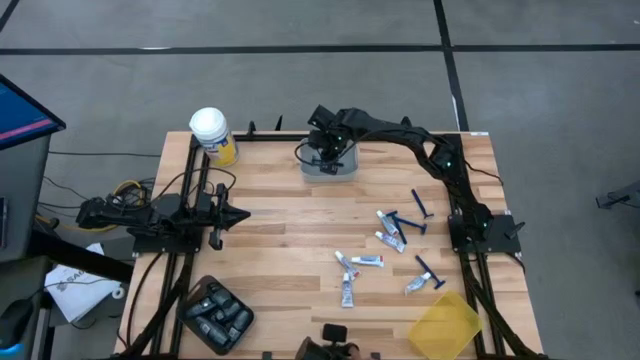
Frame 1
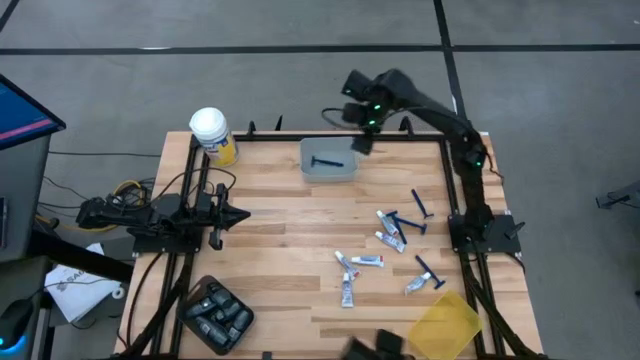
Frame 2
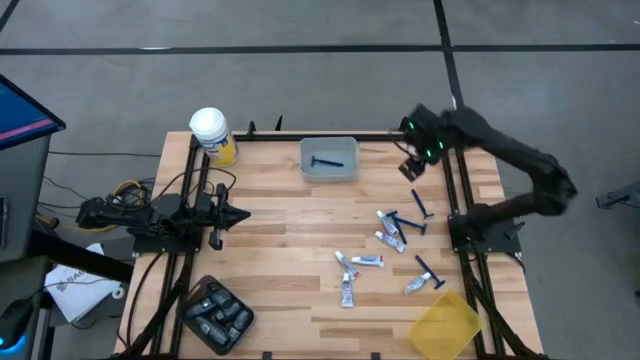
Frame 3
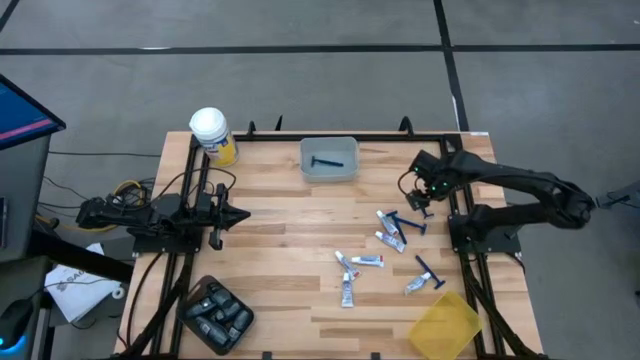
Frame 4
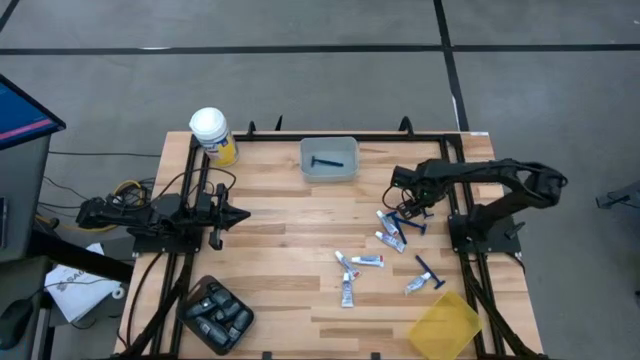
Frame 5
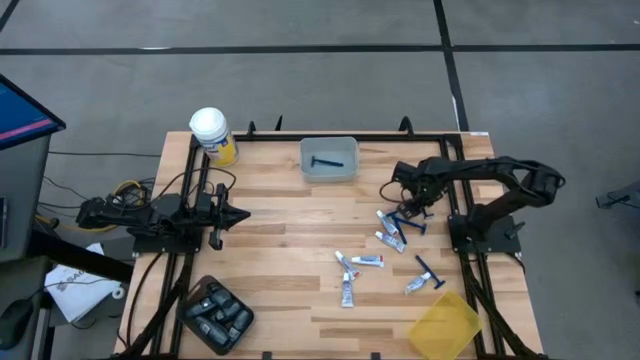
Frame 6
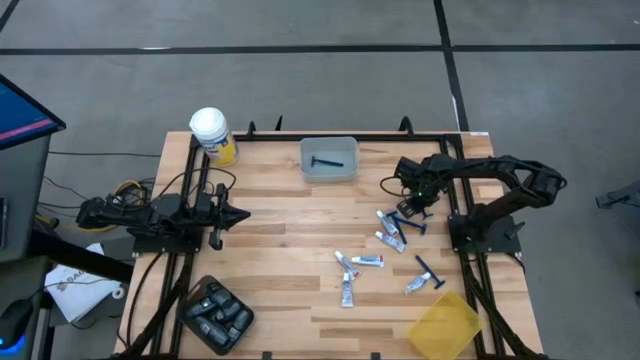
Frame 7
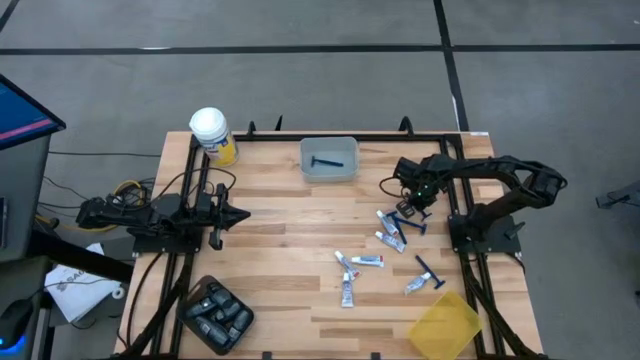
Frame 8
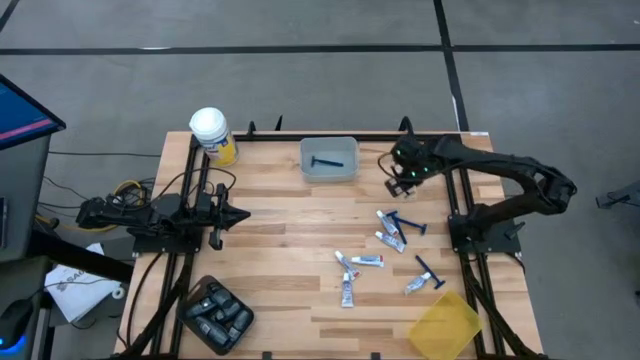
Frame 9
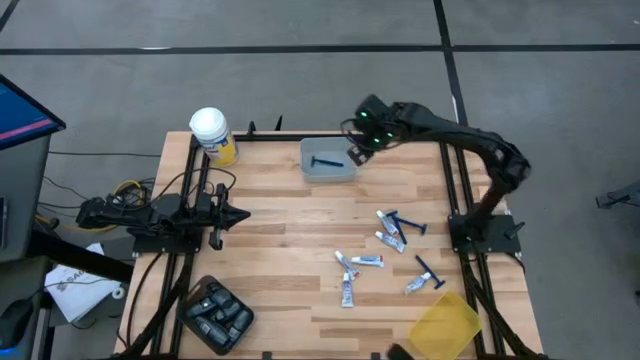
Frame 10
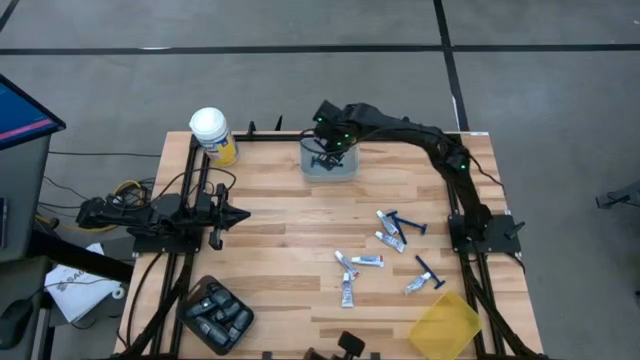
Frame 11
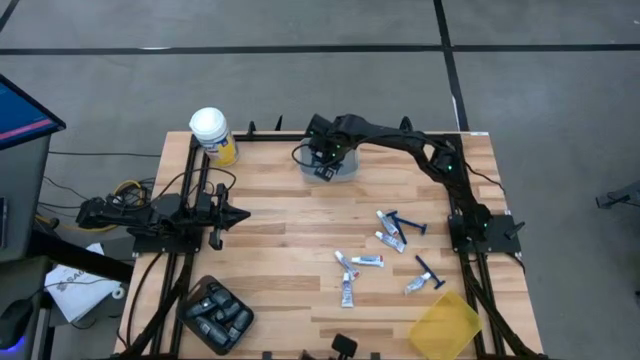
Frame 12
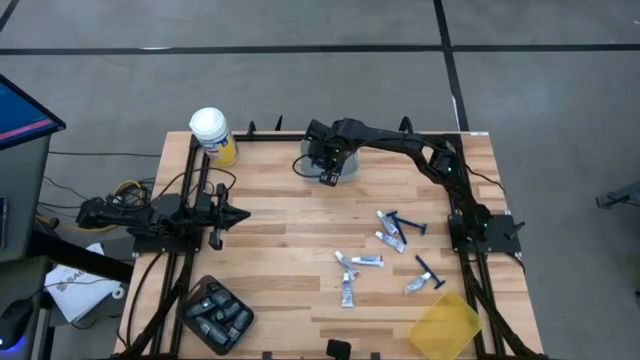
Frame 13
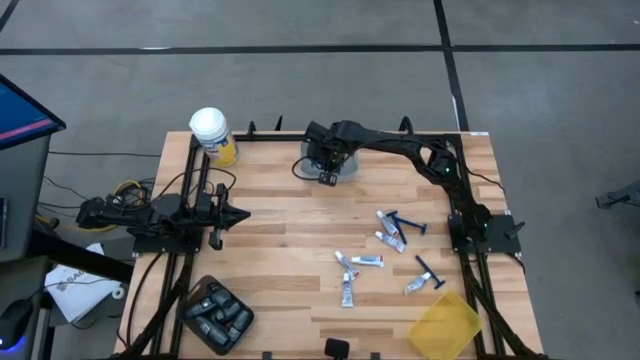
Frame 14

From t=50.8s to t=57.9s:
Task: Pick & Place Travel size toiletries
Put the blue razor into the gray bin

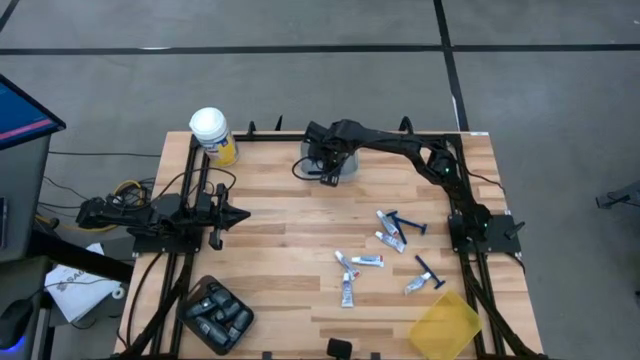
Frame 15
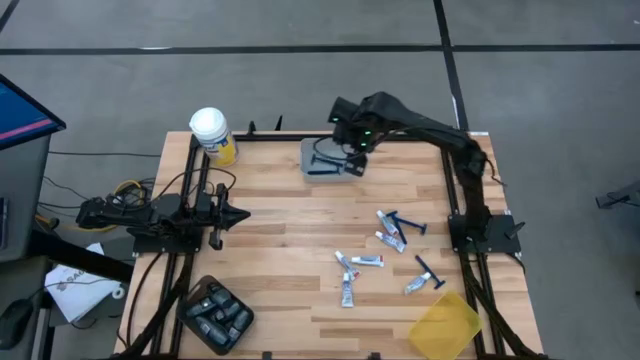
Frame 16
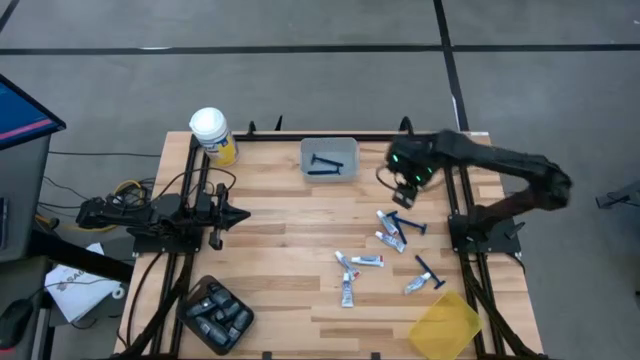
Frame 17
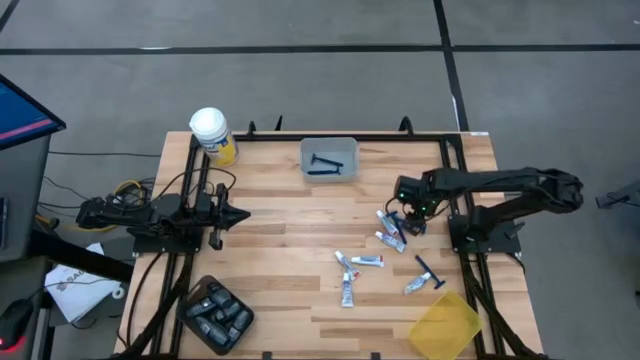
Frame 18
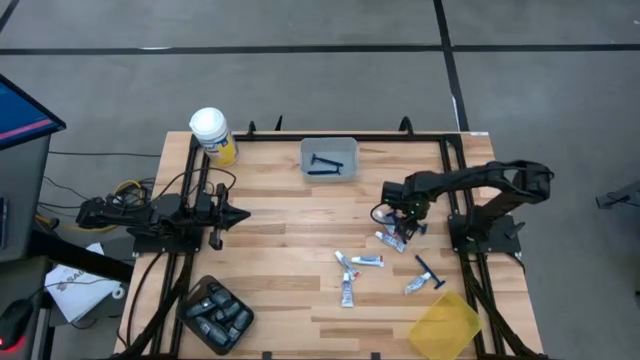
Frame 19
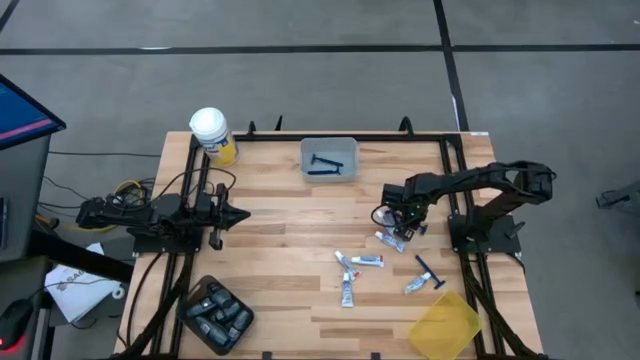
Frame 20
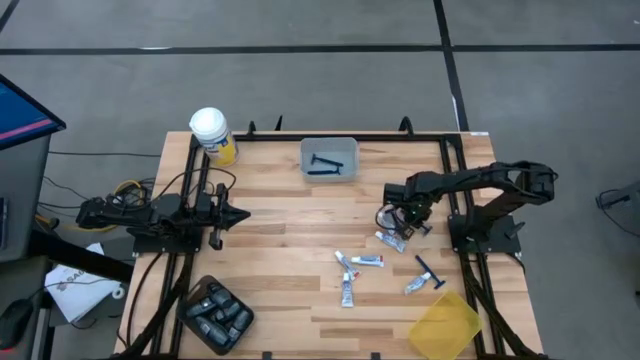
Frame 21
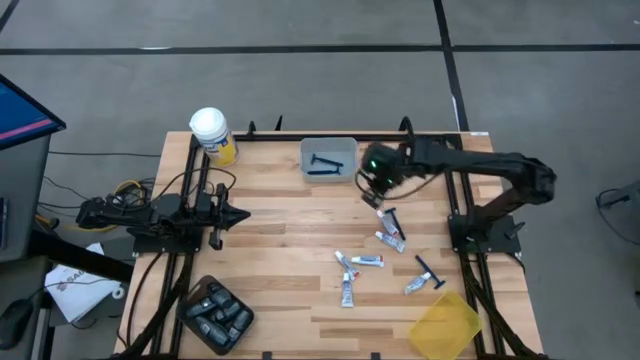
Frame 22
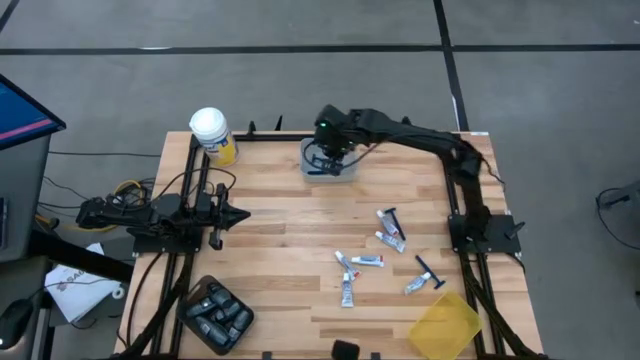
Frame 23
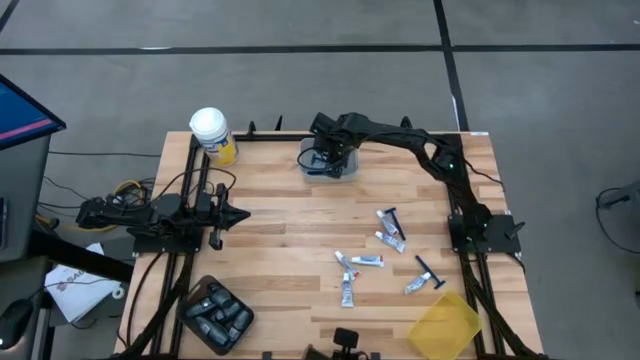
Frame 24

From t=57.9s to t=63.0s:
Put the blue razor into the gray bin

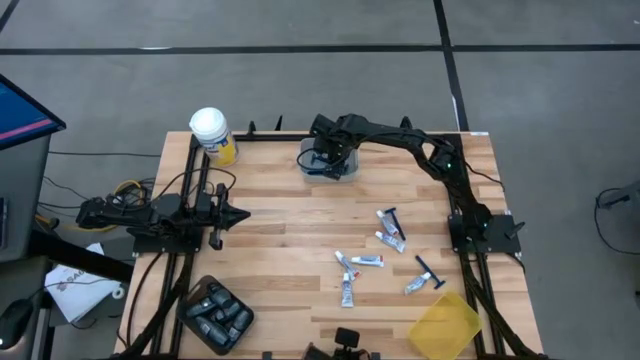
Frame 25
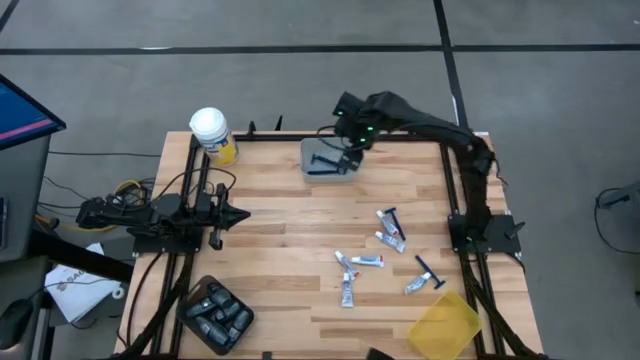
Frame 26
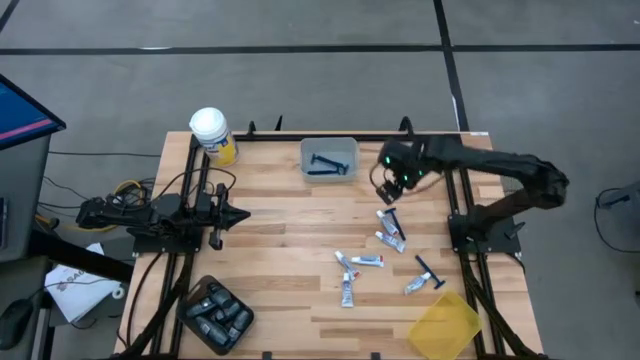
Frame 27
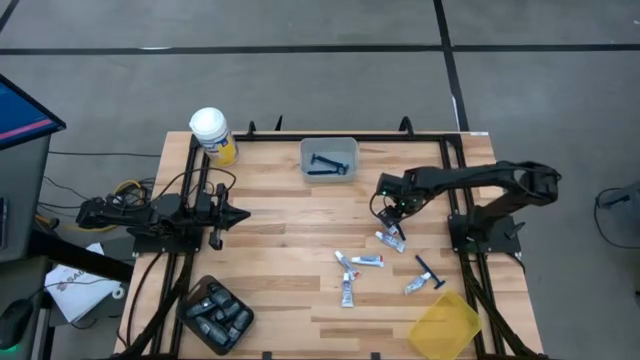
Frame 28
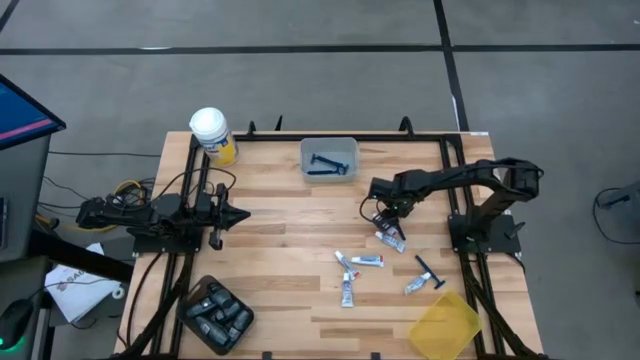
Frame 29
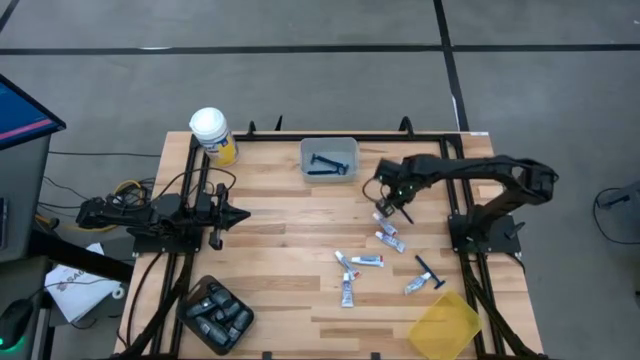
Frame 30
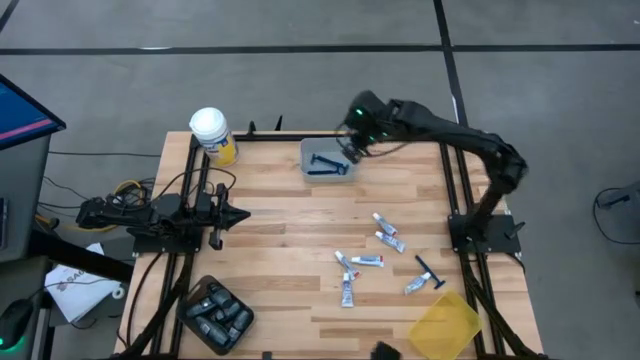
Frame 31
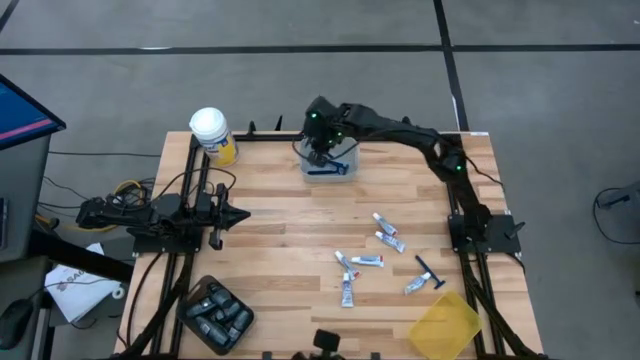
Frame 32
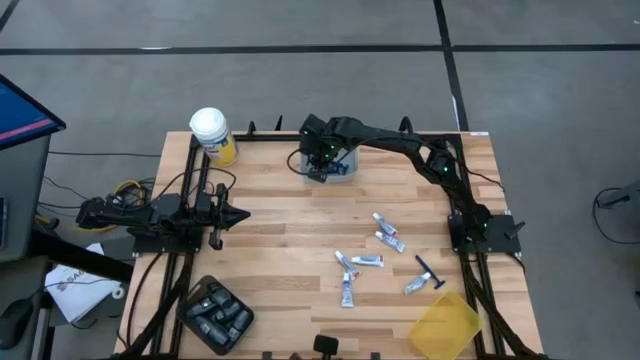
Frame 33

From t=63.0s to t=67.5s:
Put the blue razor into the gray bin

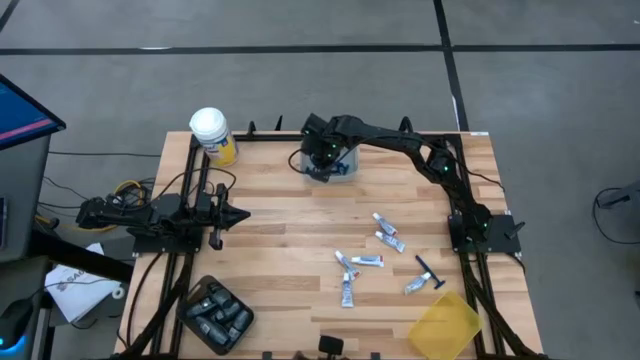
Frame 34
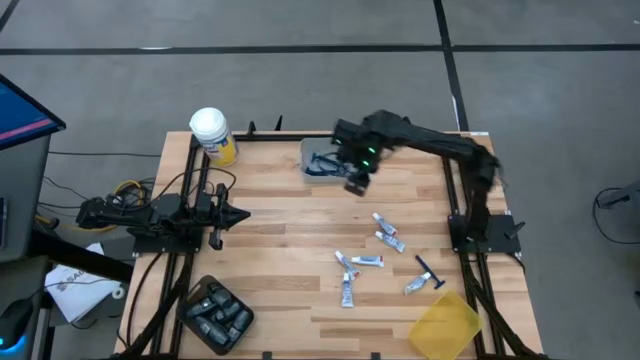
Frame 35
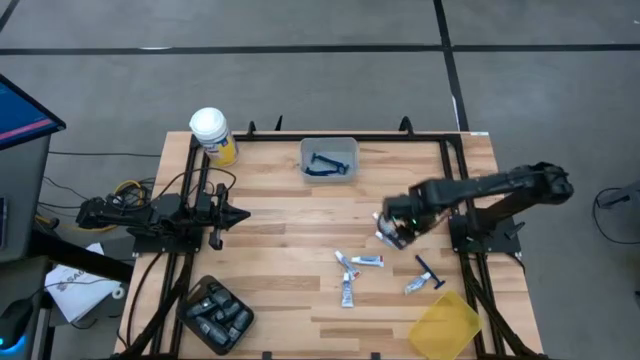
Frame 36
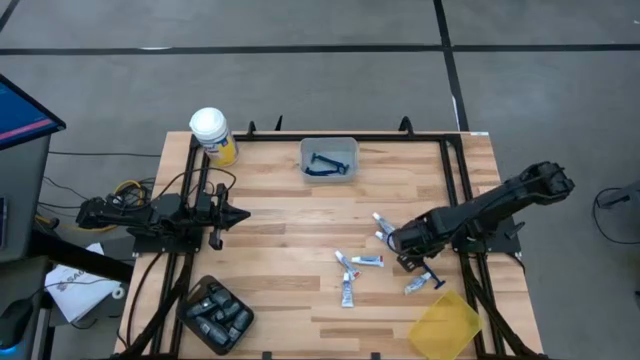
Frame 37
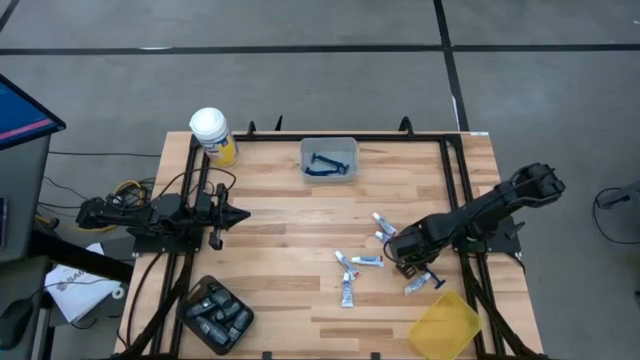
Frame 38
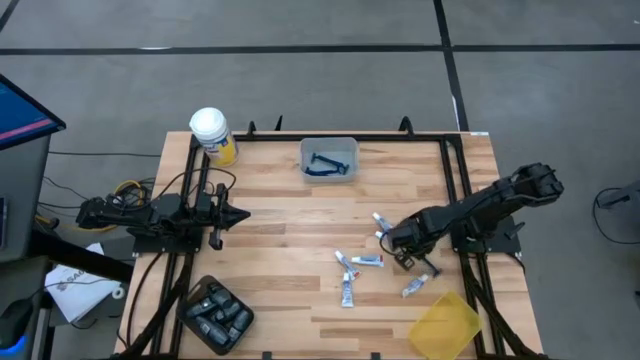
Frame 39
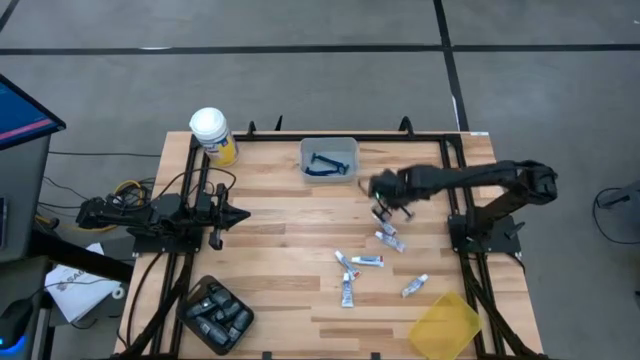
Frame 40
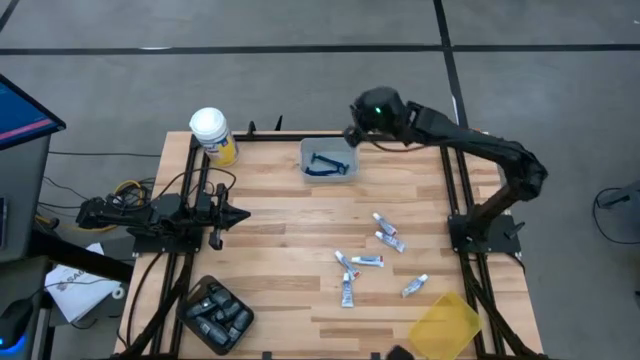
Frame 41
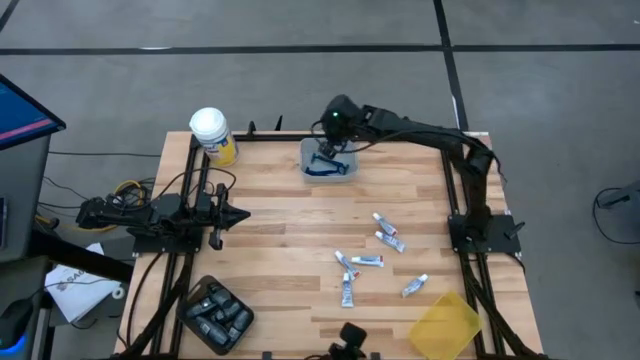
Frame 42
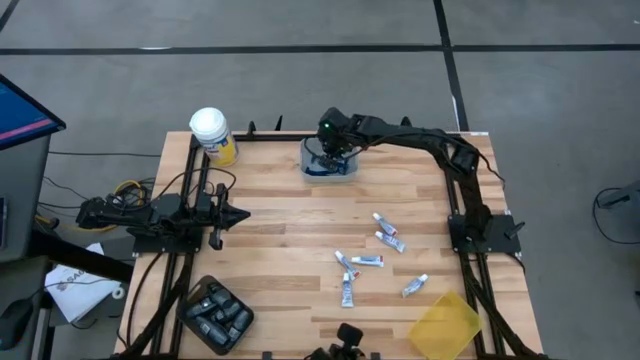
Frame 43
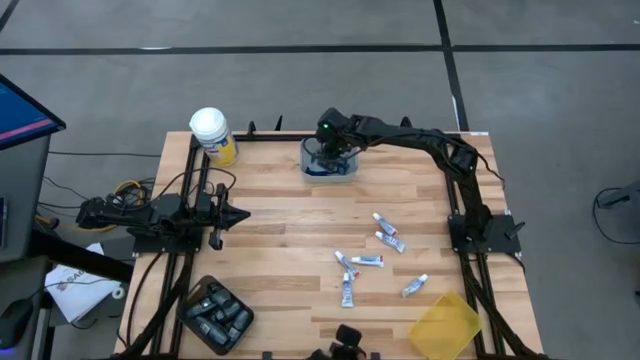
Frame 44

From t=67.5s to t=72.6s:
Put the blue razor into the gray bin
